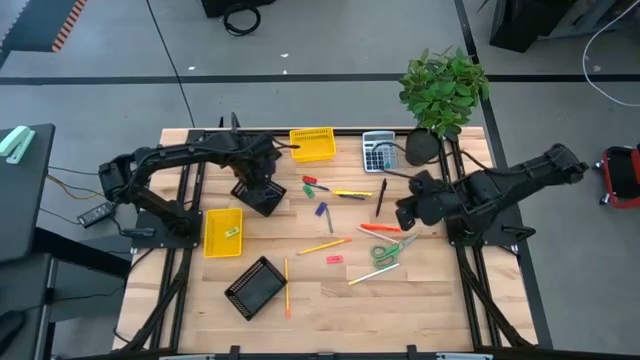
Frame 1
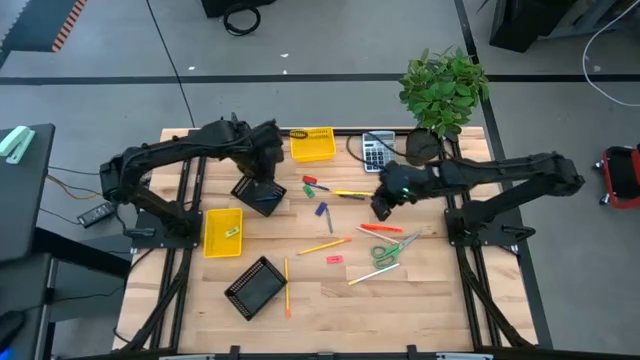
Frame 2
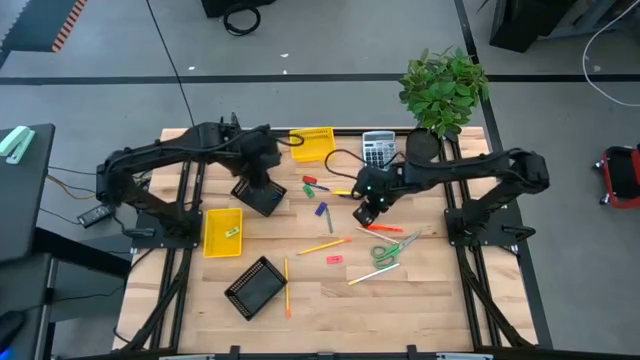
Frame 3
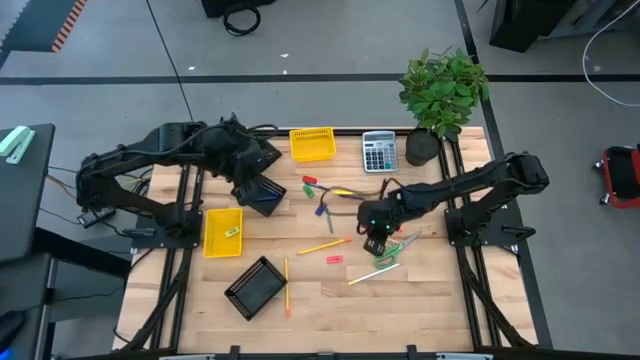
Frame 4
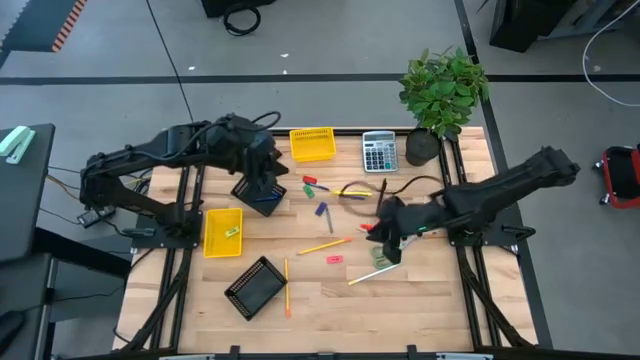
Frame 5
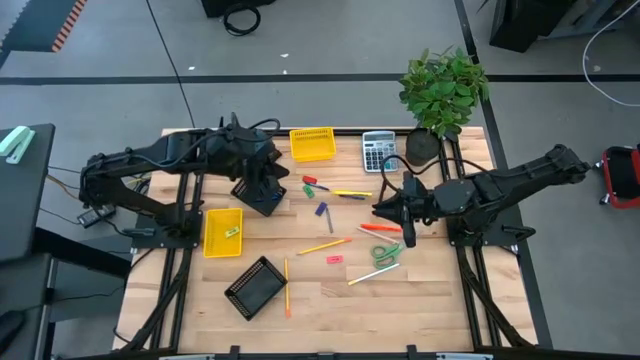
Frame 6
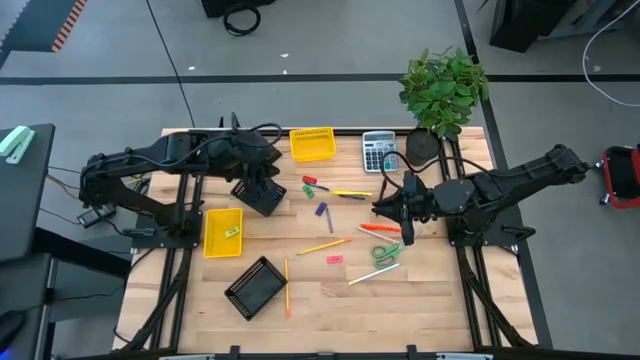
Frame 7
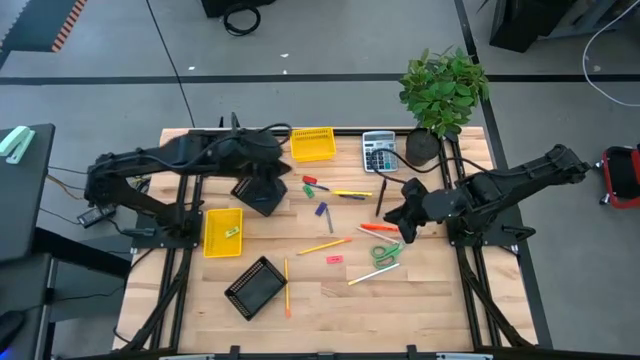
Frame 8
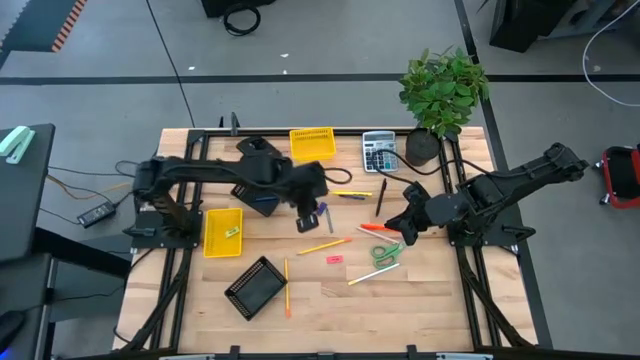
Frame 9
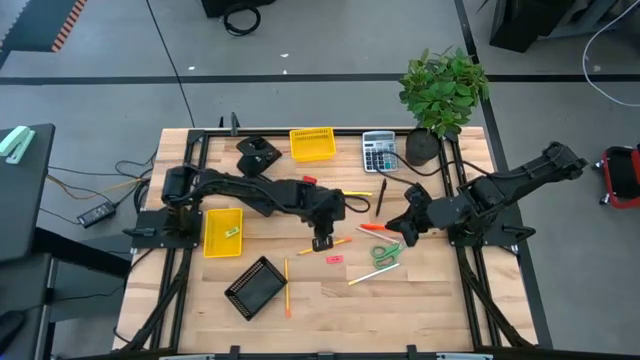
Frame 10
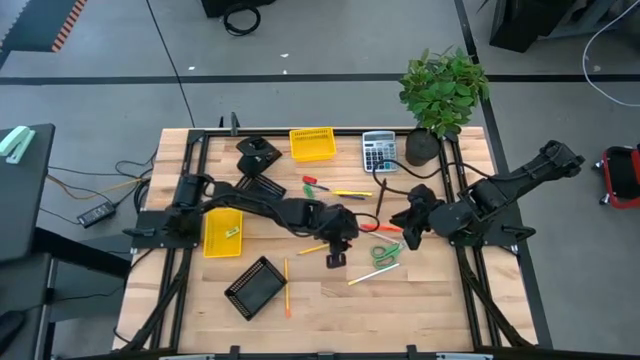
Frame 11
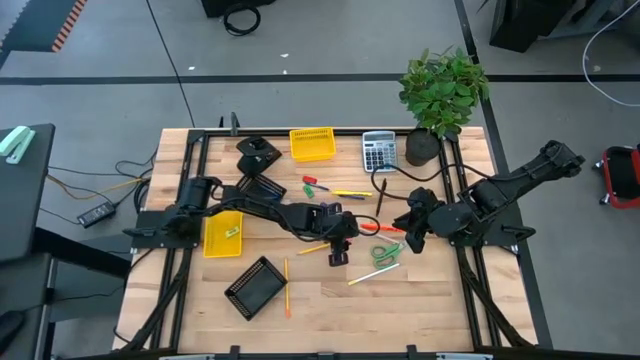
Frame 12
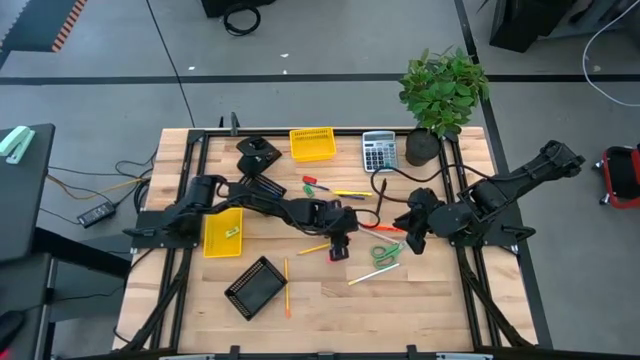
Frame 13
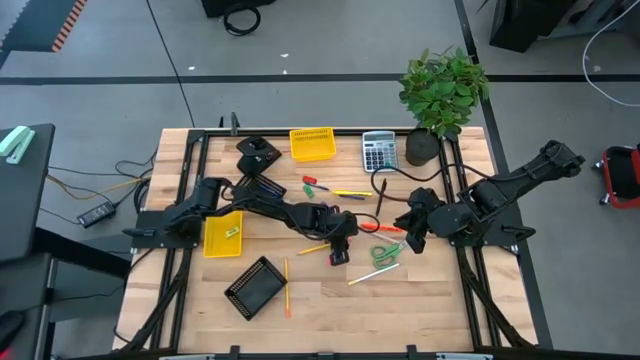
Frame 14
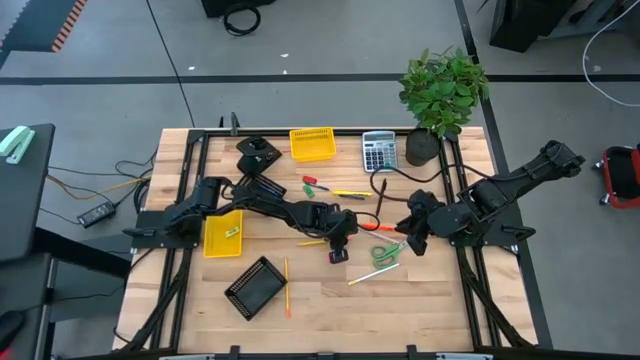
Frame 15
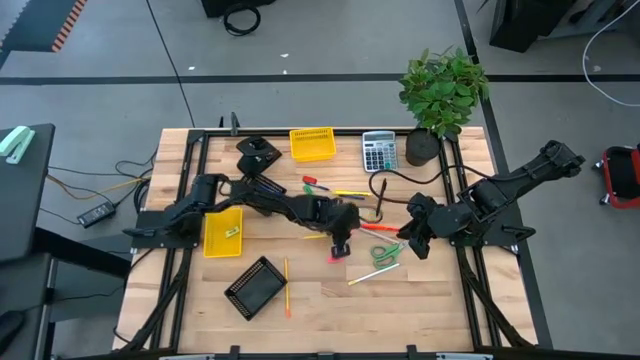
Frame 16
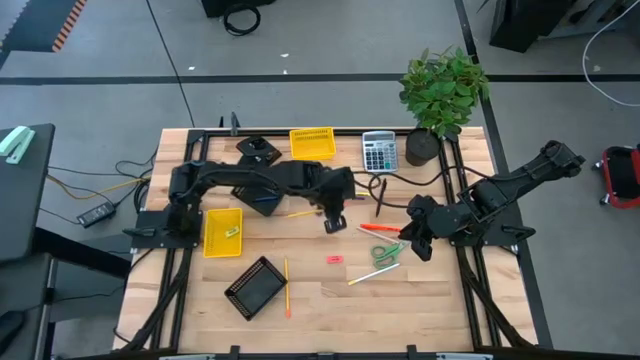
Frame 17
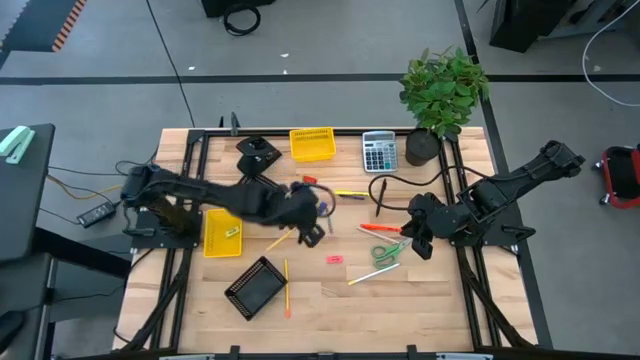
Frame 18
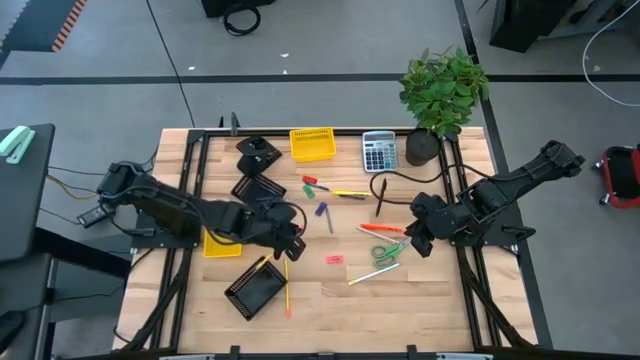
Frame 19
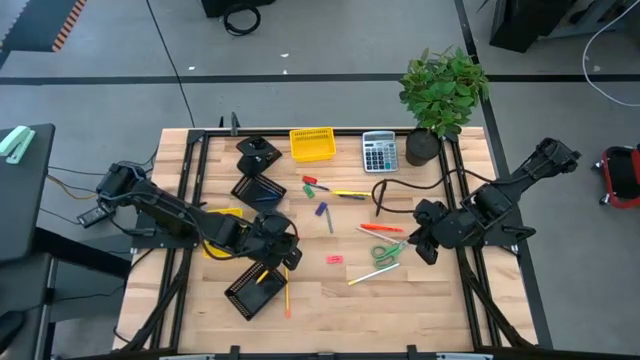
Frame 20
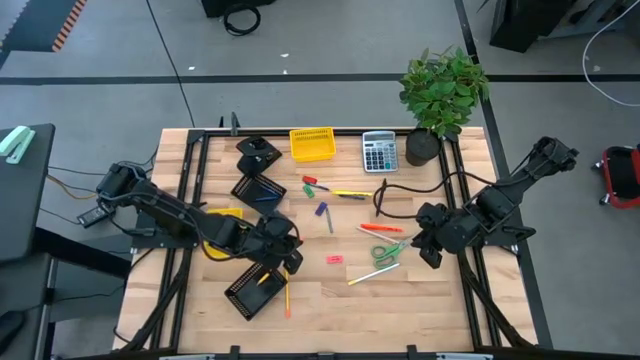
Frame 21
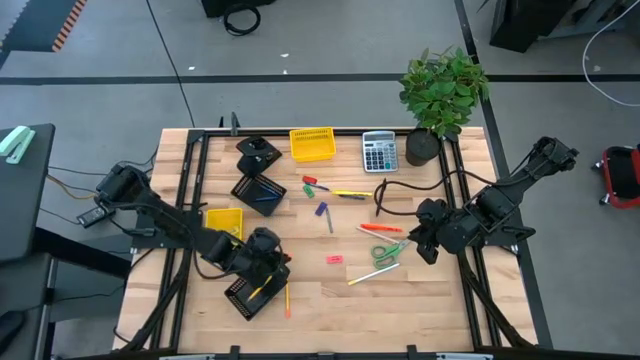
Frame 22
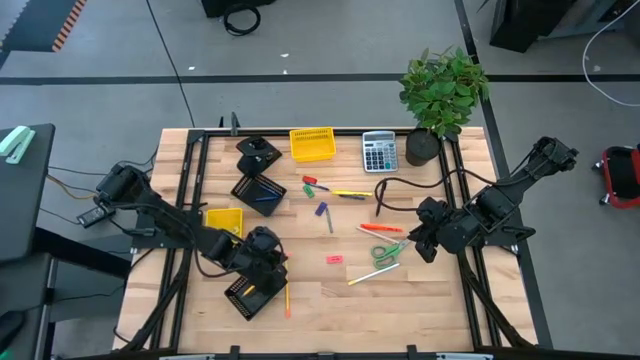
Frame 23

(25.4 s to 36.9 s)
Task: Sort crayons/erasers/pens/pencils in bins
Put the yellow pencil into the bottom black basket

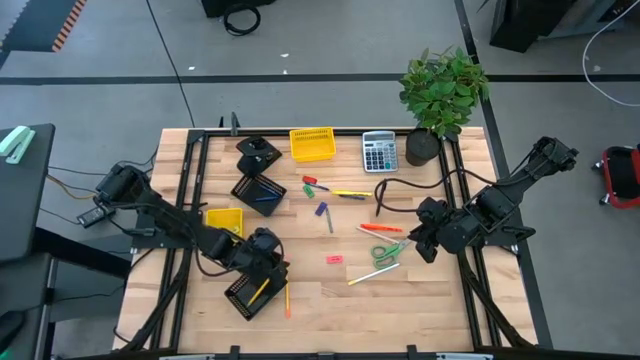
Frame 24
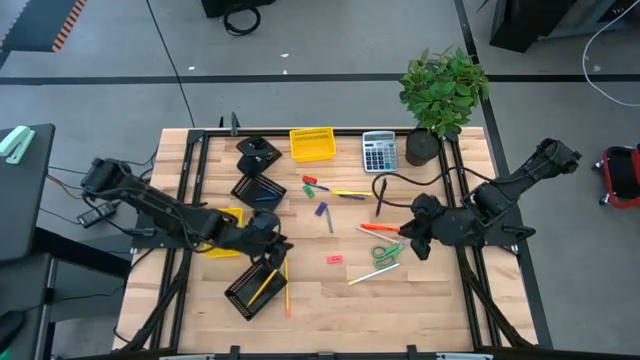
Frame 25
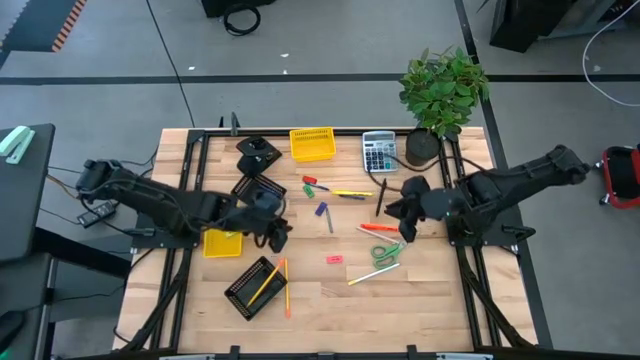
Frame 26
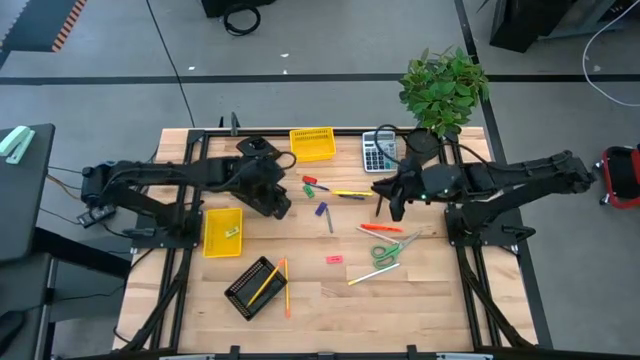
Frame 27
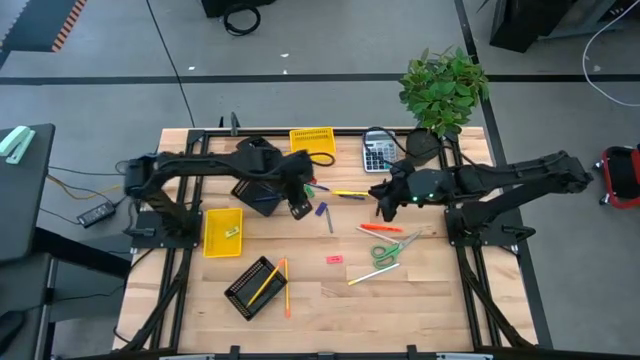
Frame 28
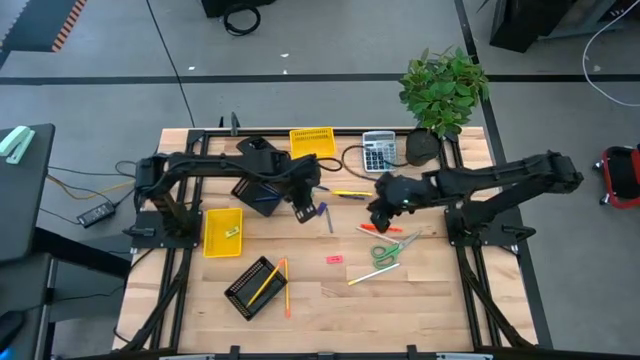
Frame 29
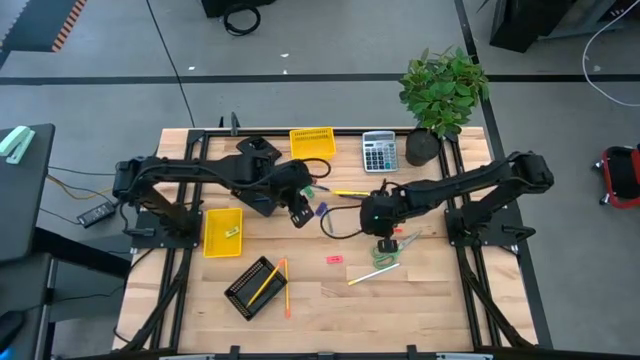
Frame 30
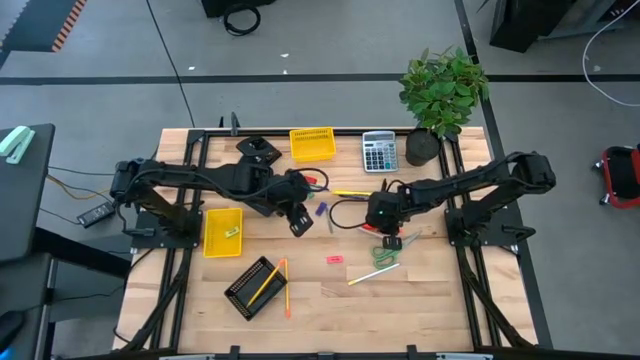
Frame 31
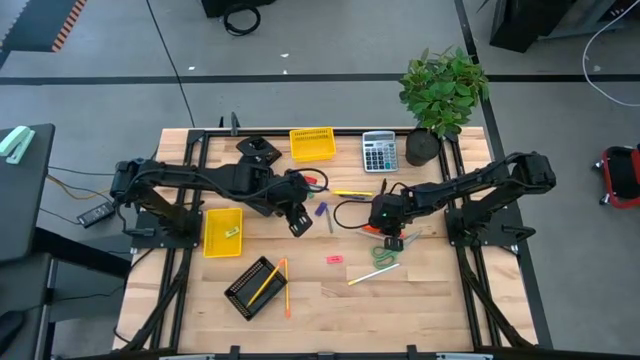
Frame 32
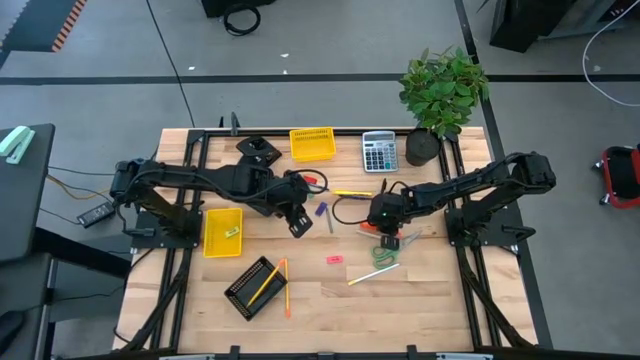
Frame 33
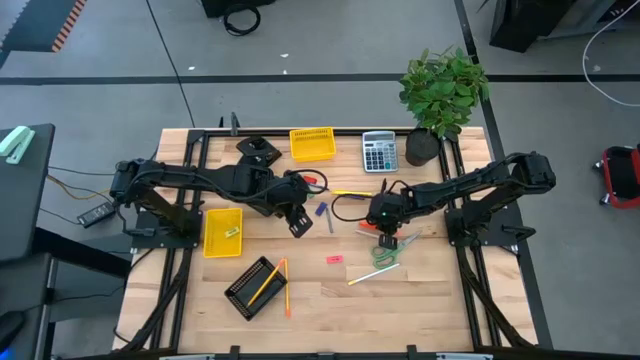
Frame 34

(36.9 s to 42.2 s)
Put the orange pen into the top yellow basket

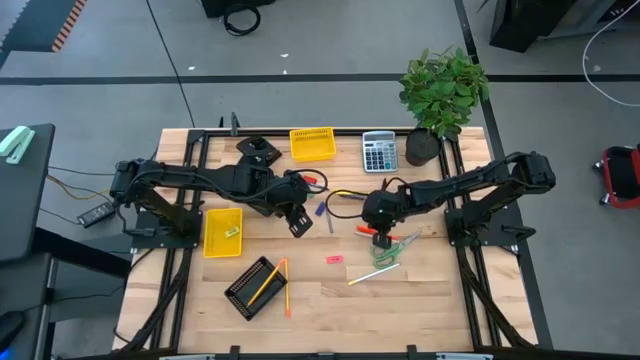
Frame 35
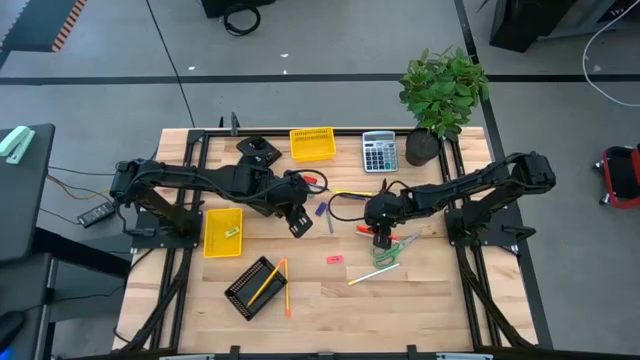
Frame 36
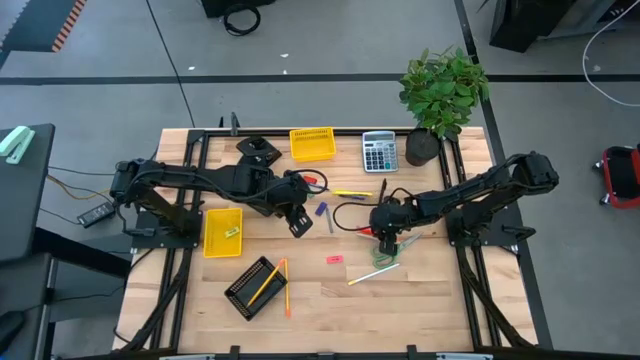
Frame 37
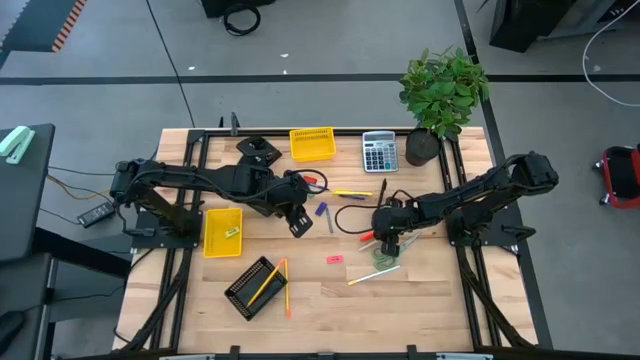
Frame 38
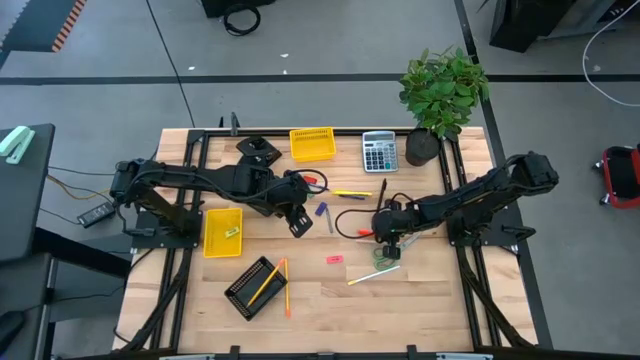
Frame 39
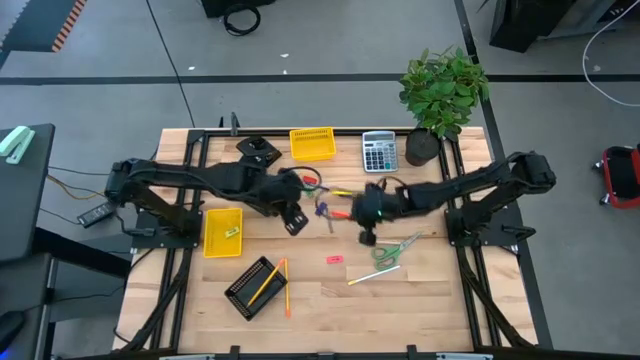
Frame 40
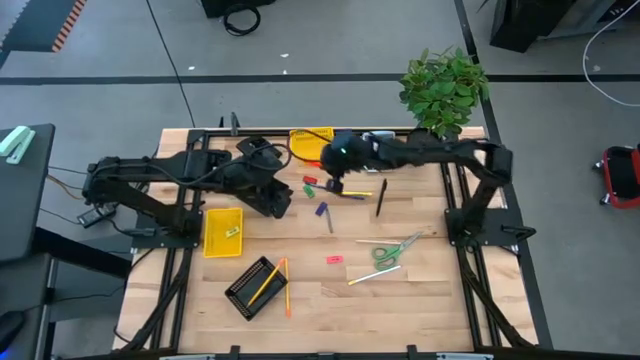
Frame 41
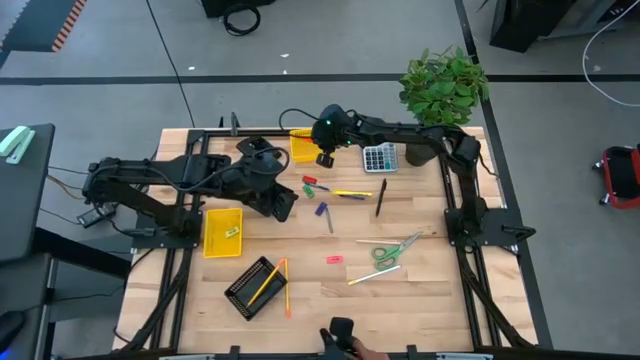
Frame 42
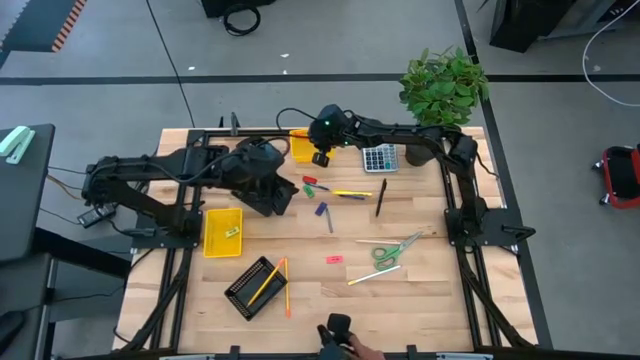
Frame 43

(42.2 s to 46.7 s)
Put the orange pen into the top yellow basket
